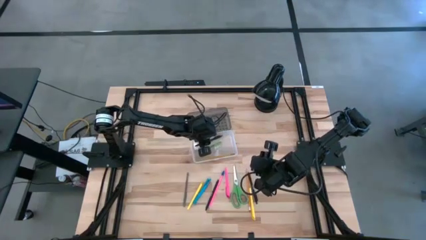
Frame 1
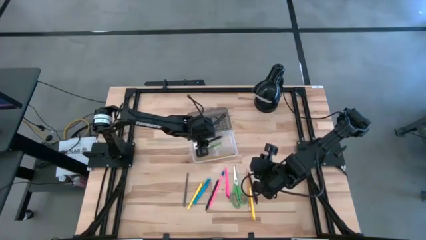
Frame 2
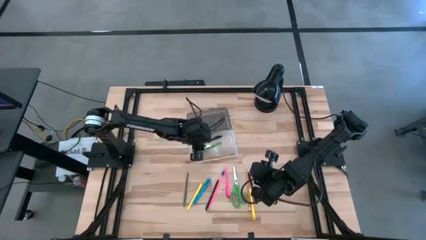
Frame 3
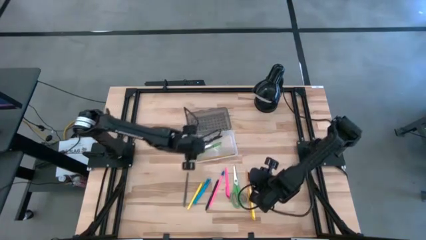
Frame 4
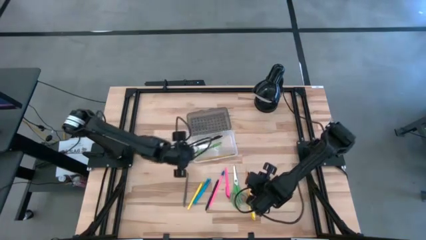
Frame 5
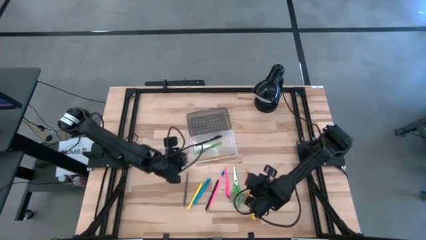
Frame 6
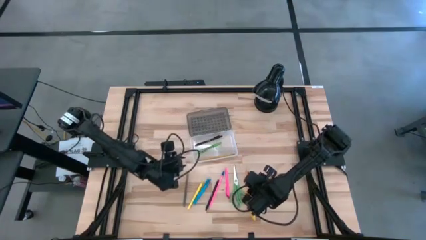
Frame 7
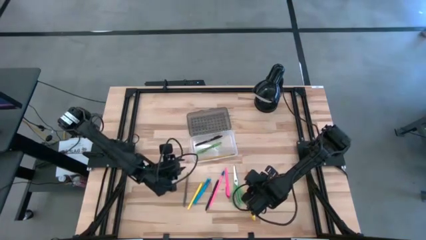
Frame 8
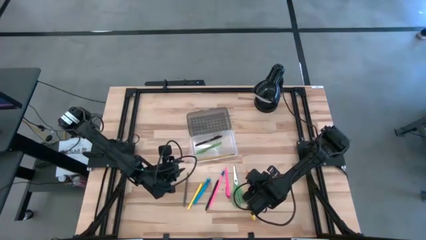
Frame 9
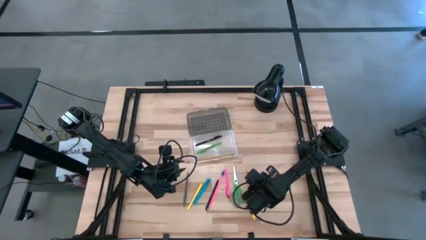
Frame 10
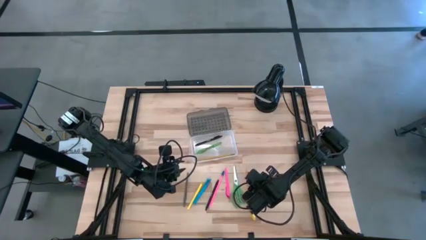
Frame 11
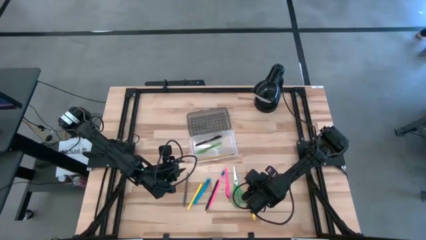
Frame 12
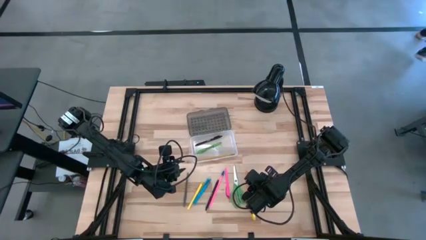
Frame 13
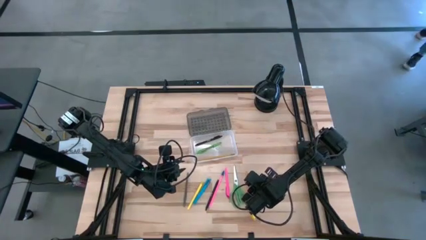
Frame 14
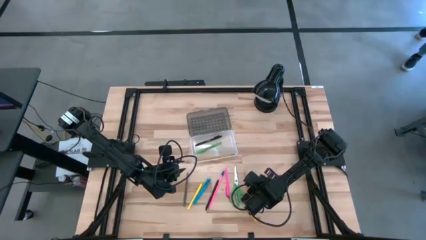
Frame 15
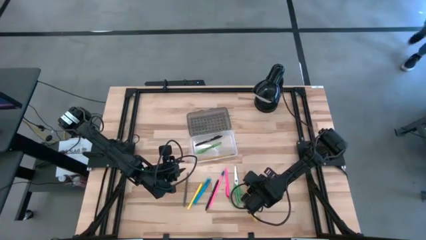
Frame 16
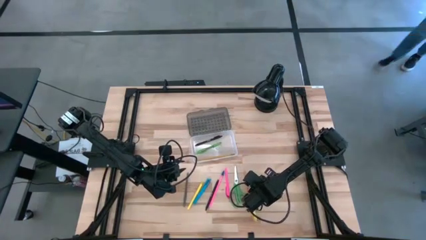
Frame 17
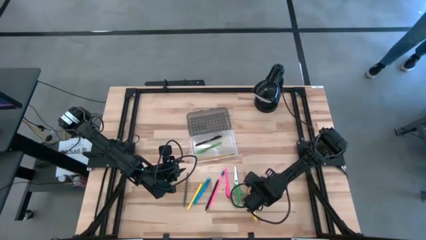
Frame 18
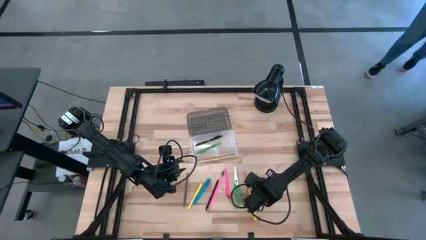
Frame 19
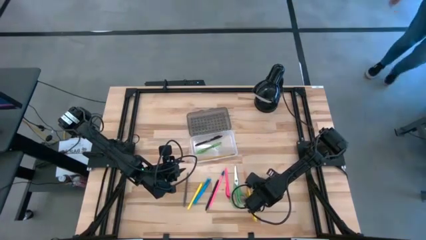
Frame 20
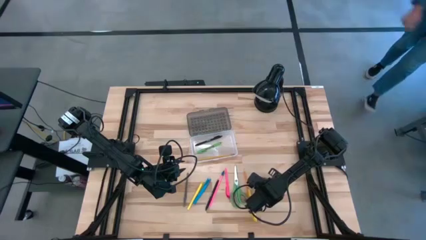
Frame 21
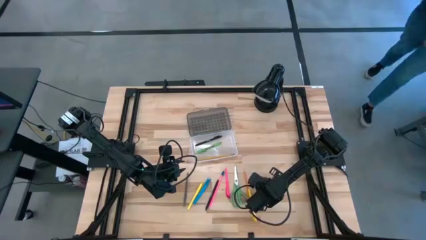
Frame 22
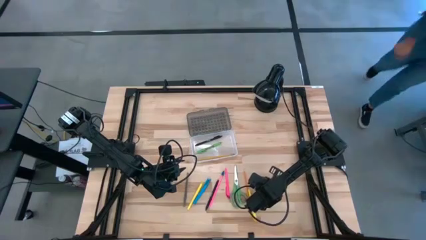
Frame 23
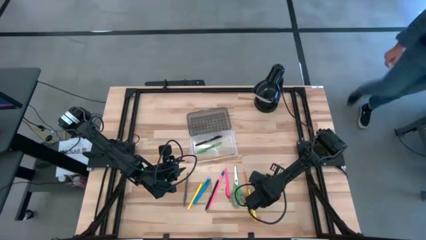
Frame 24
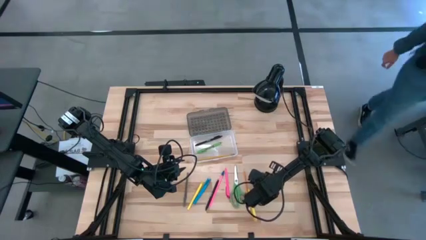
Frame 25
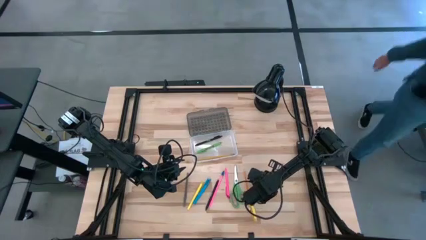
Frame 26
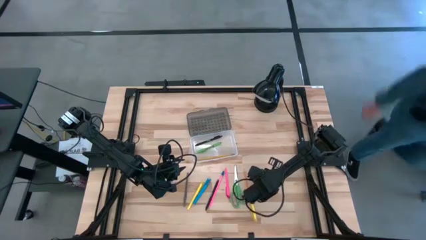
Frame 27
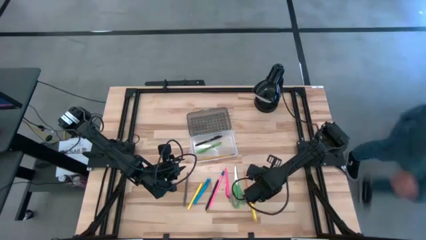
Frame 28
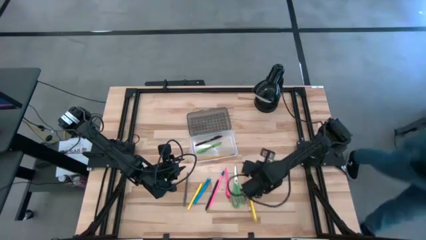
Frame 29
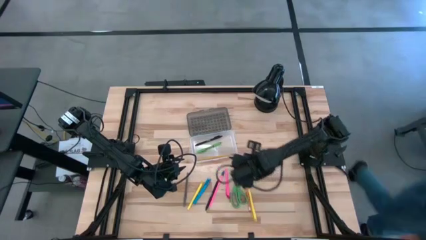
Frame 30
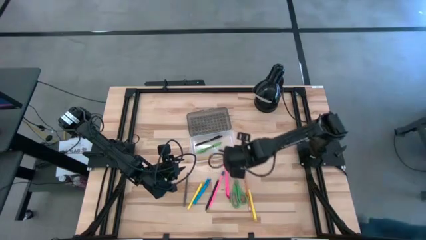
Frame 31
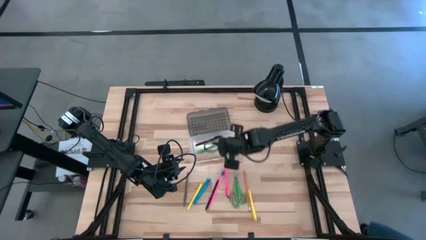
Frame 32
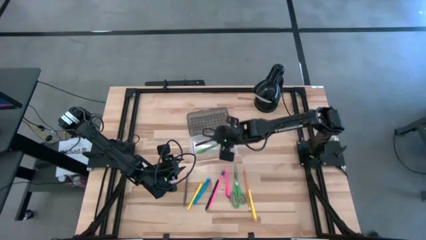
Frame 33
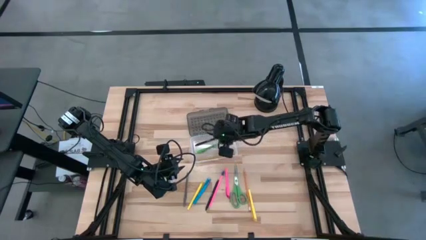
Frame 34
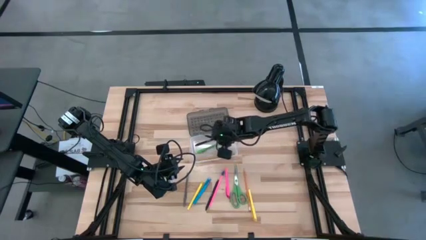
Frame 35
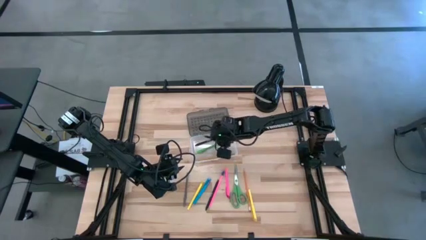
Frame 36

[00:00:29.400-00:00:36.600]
Task: Pick & place school supplies into a supply box
Put the right black pen into the transparent supply box

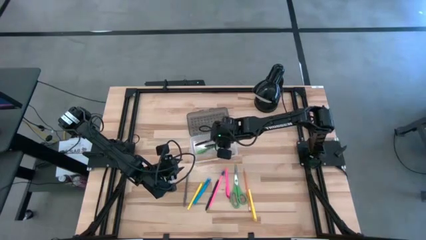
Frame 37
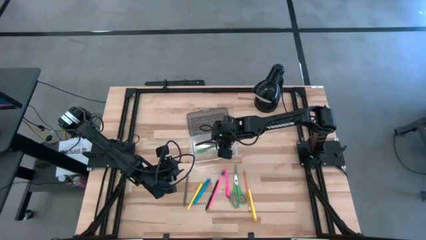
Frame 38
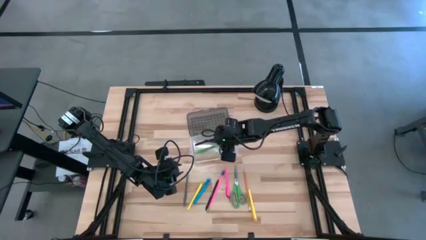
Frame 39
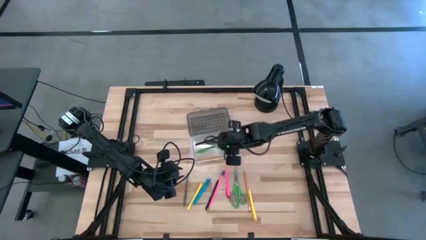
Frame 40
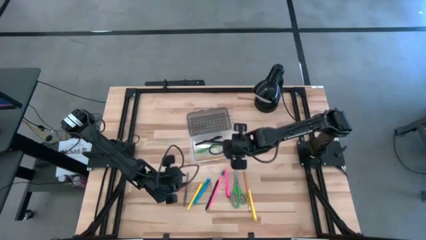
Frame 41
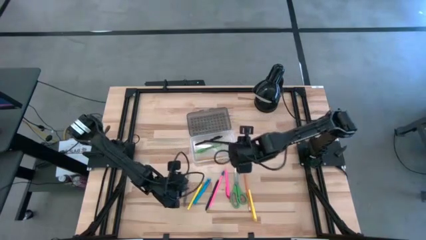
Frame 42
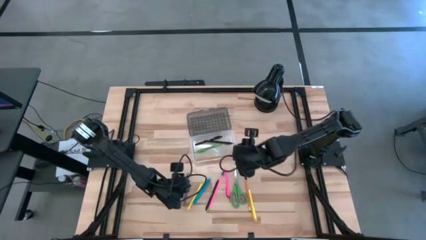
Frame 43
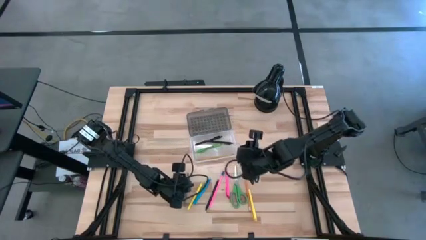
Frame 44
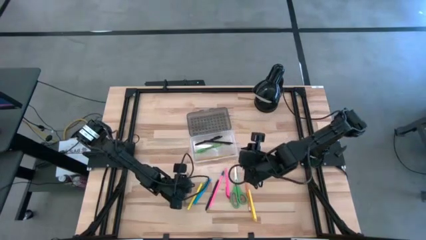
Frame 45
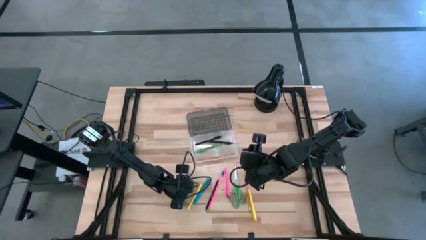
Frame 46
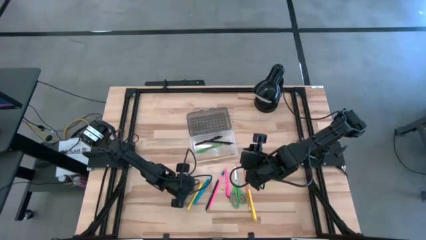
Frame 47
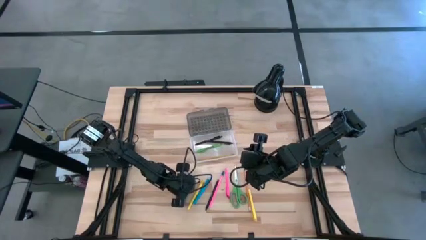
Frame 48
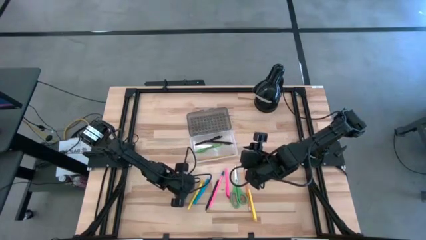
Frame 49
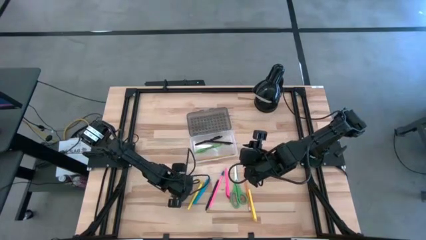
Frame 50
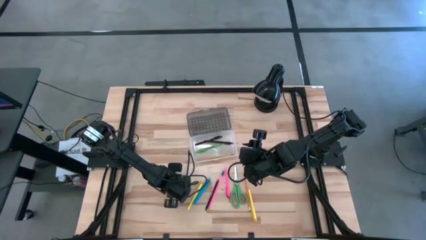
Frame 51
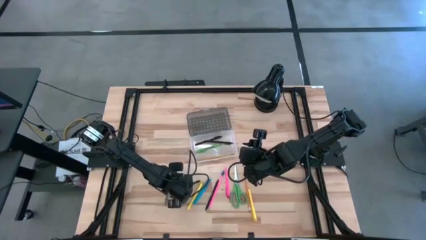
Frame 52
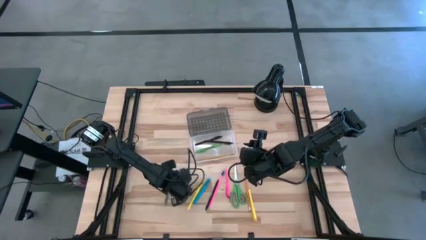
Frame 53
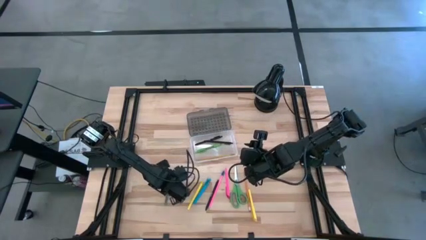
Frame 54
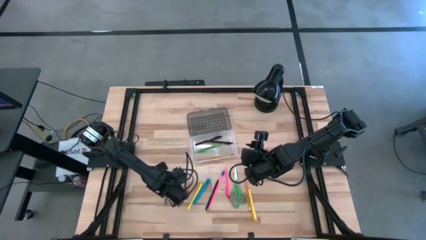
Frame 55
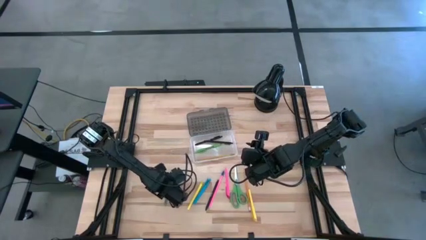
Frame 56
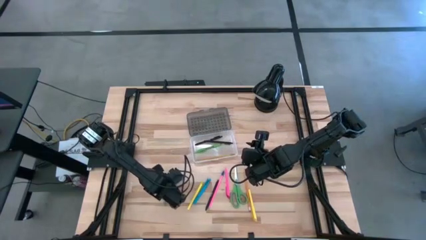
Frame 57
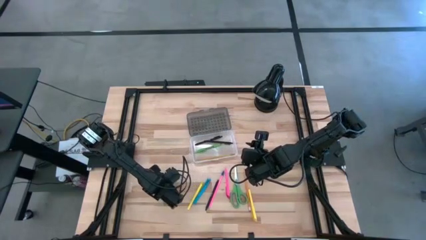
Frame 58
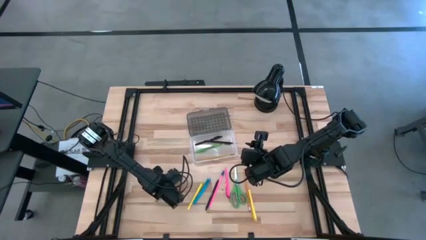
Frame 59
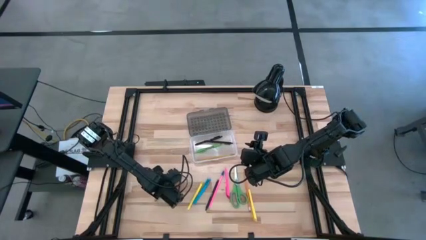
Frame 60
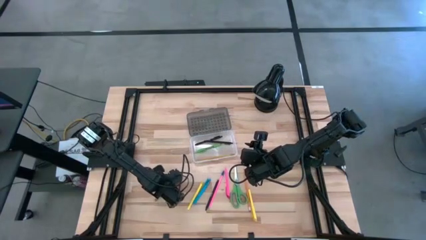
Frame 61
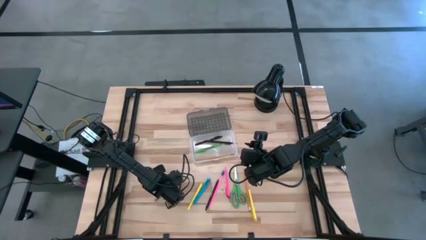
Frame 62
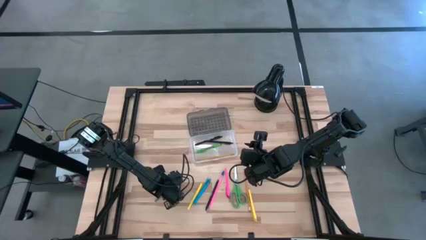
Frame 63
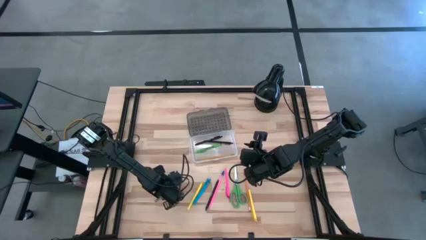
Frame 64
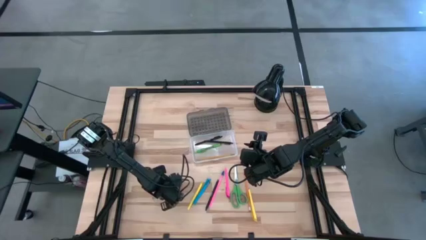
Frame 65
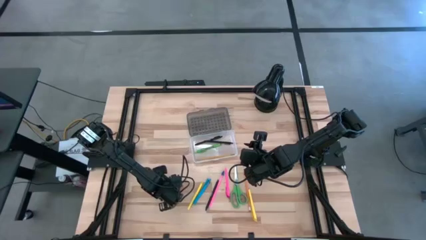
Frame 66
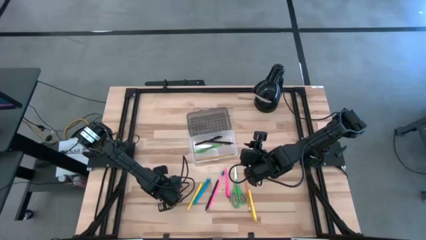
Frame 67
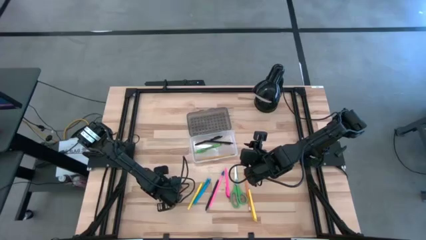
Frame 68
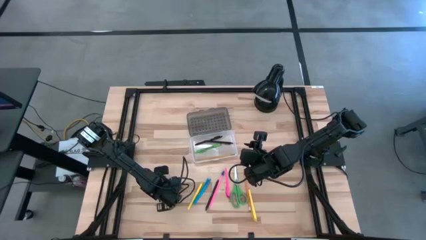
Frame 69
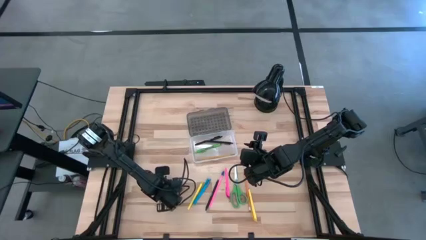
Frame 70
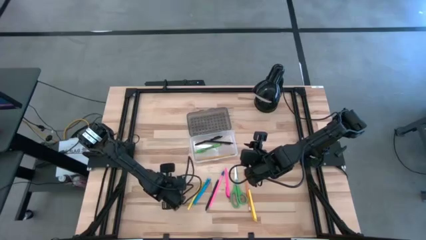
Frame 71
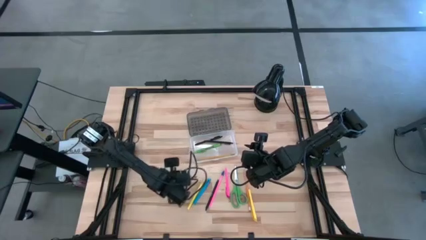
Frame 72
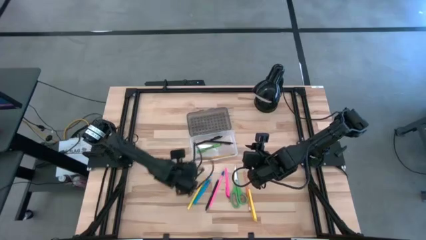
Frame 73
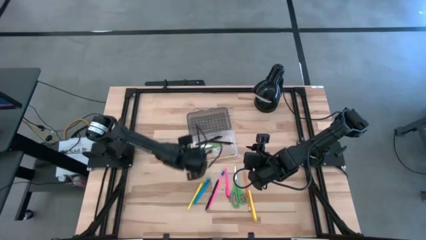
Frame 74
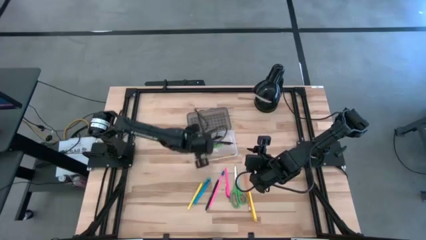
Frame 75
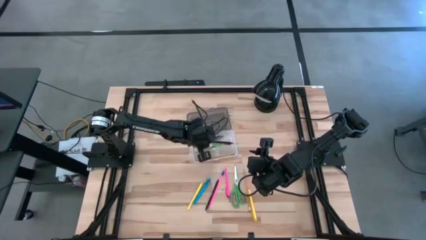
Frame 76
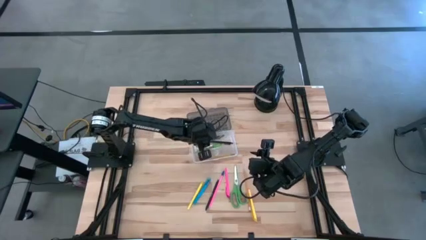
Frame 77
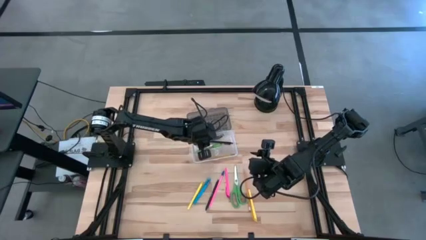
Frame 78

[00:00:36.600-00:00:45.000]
Put the gray pen into the transparent supply box

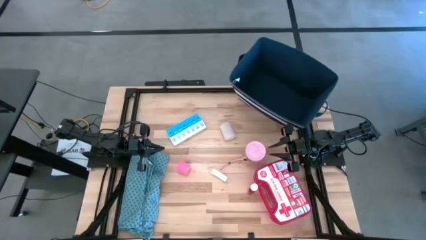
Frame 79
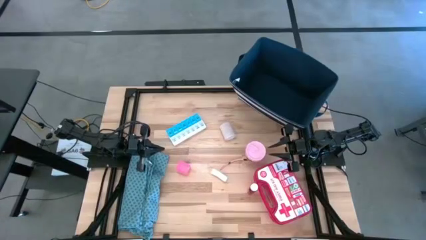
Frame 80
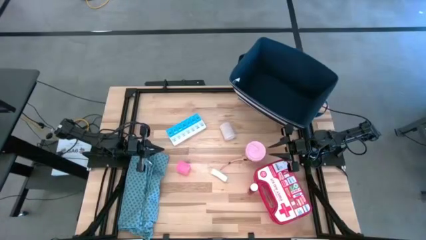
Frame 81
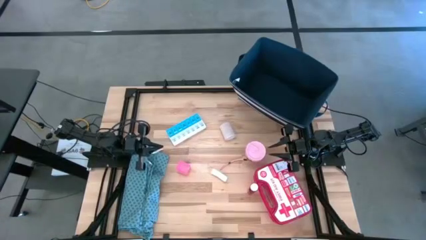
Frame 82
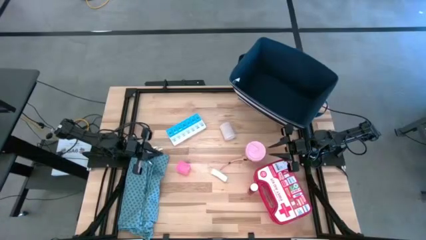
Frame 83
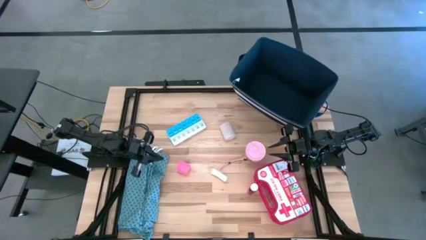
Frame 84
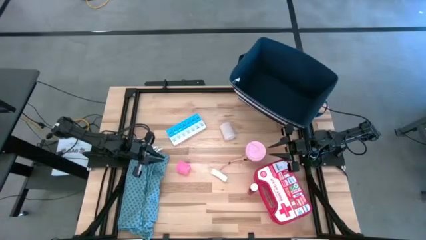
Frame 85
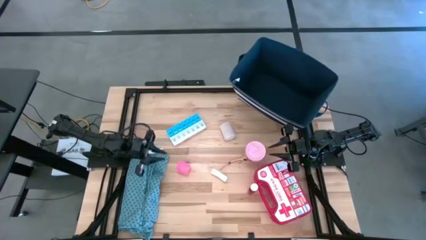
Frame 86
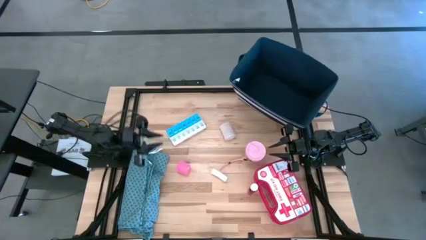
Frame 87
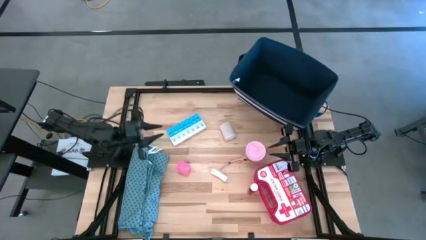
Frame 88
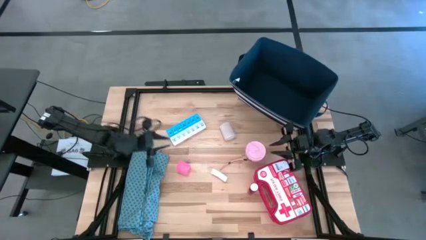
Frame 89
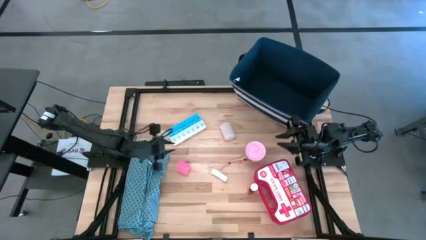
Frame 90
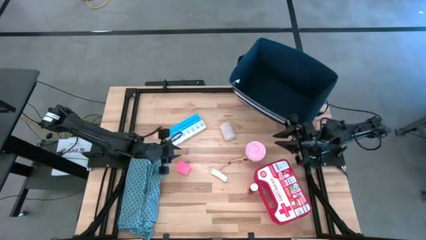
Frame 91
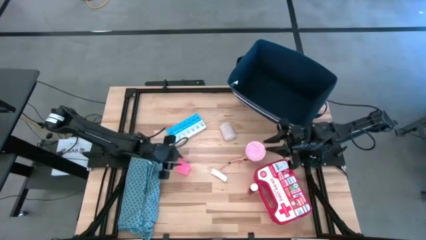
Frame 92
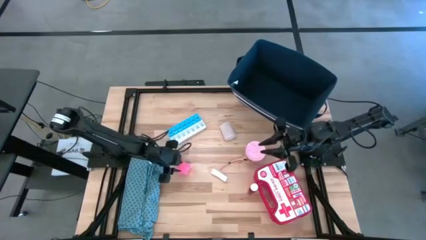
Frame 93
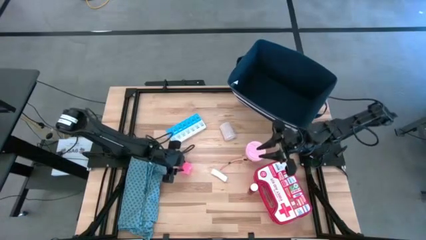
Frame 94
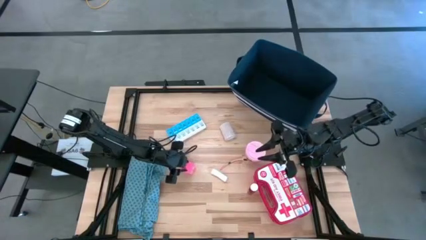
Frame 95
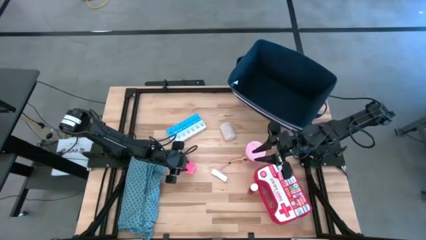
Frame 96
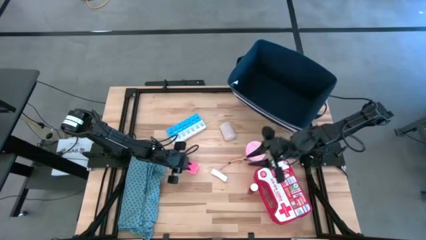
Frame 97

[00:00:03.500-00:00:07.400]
Task: Pick & place medical supplies in basket/bin
Put the pink bandage into the blue bin
